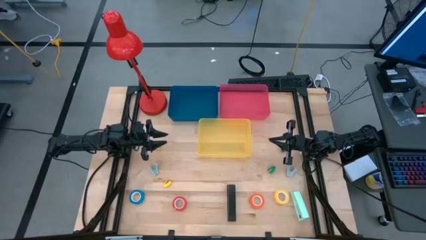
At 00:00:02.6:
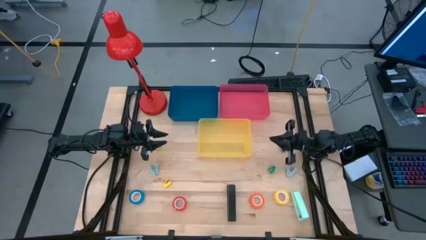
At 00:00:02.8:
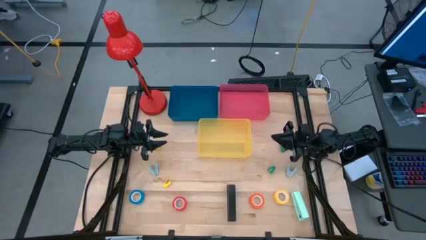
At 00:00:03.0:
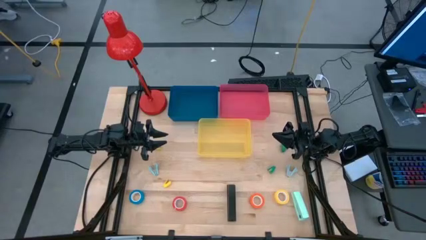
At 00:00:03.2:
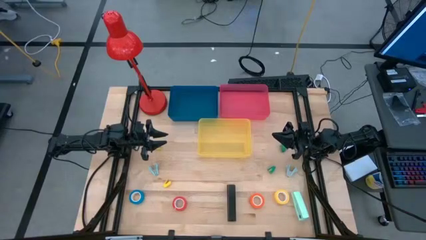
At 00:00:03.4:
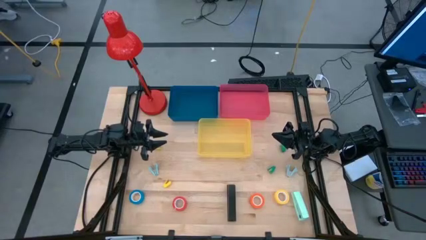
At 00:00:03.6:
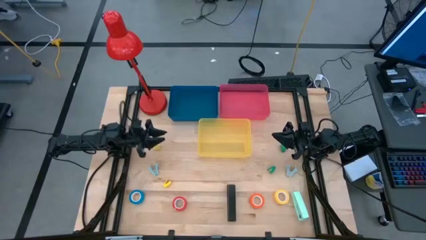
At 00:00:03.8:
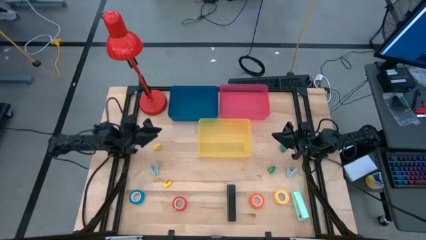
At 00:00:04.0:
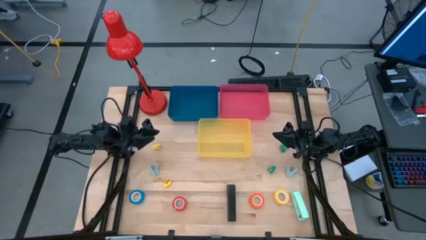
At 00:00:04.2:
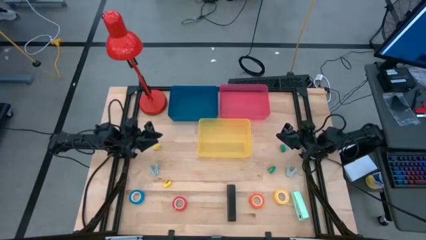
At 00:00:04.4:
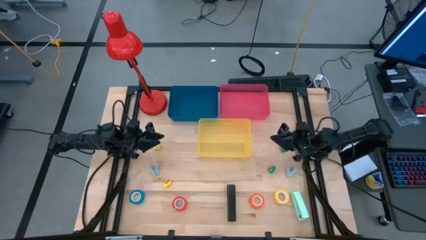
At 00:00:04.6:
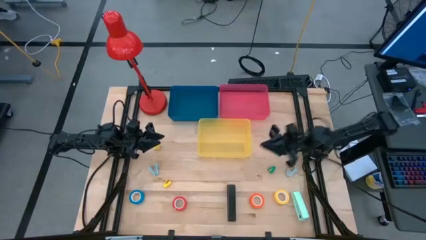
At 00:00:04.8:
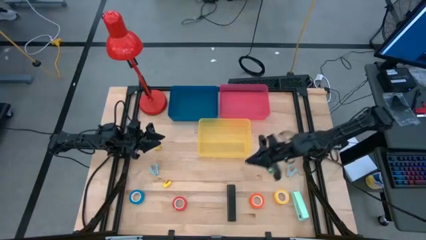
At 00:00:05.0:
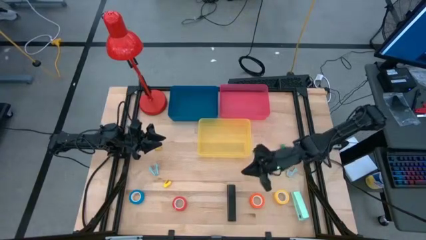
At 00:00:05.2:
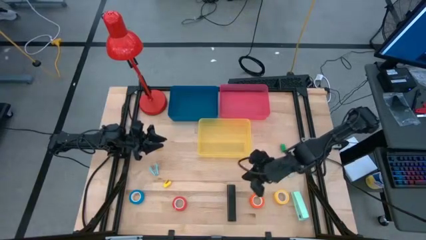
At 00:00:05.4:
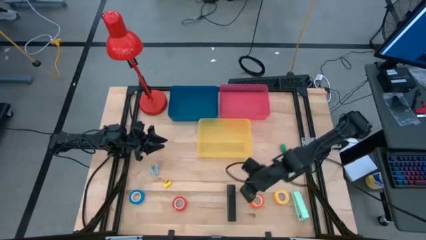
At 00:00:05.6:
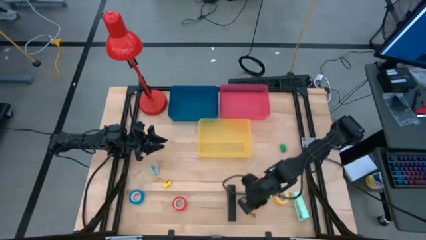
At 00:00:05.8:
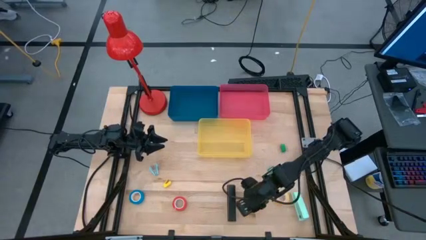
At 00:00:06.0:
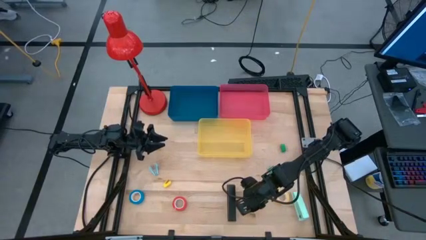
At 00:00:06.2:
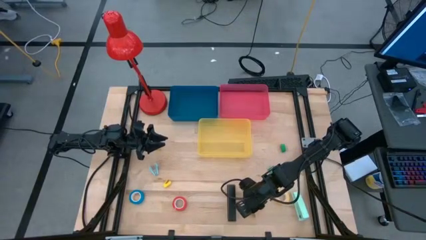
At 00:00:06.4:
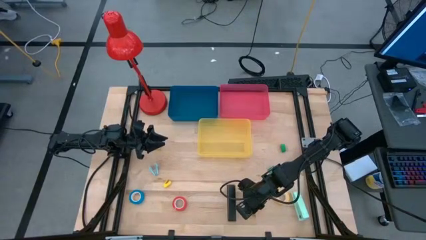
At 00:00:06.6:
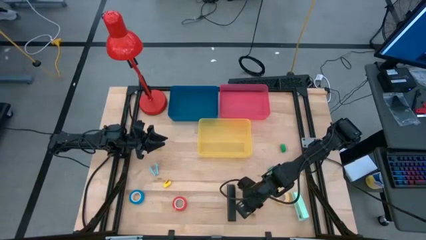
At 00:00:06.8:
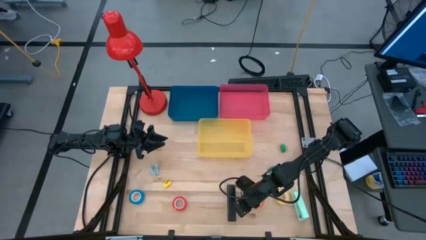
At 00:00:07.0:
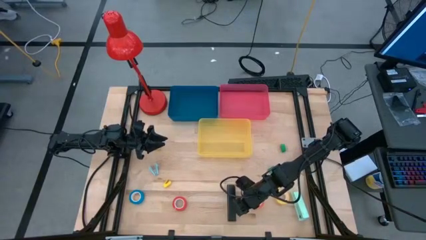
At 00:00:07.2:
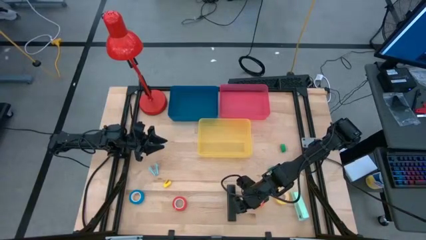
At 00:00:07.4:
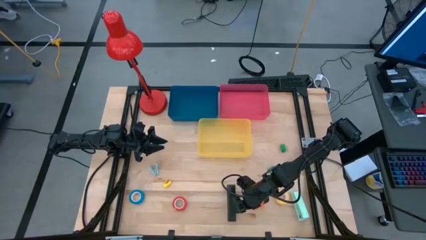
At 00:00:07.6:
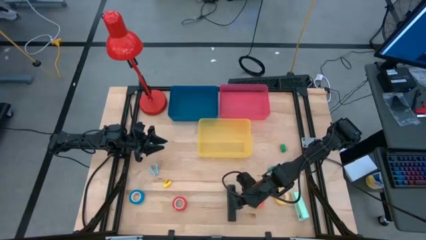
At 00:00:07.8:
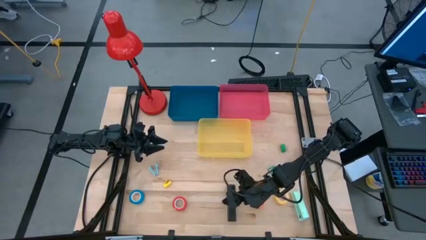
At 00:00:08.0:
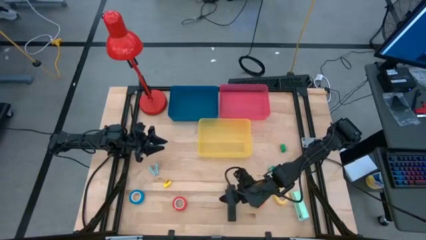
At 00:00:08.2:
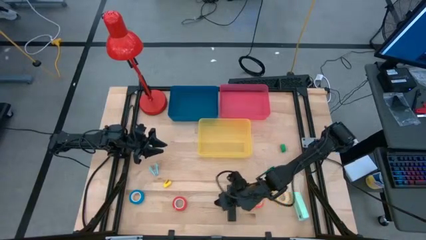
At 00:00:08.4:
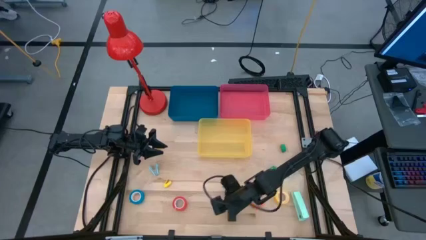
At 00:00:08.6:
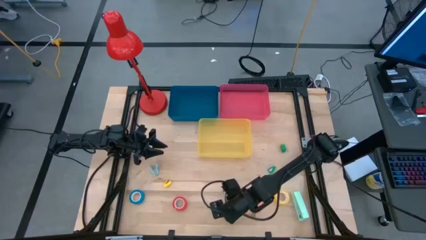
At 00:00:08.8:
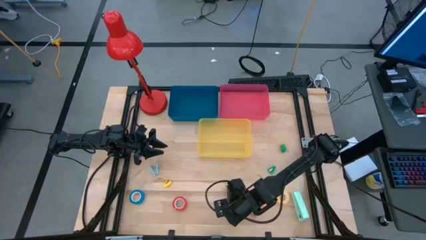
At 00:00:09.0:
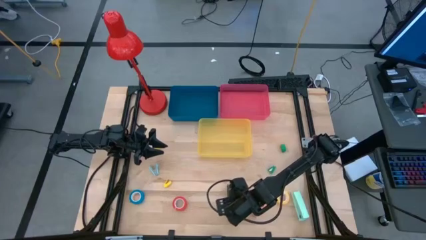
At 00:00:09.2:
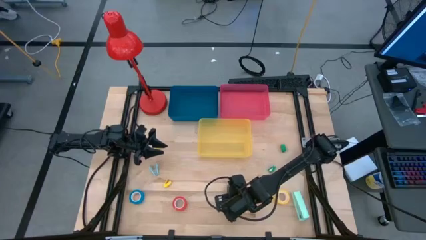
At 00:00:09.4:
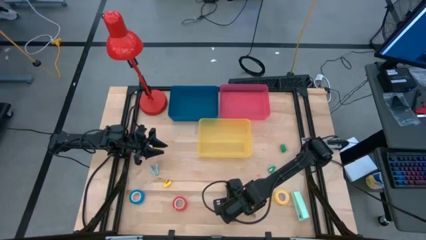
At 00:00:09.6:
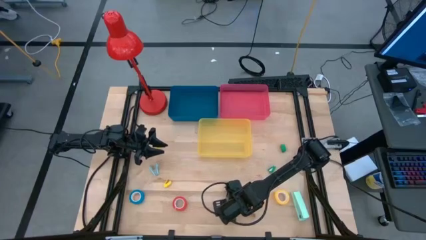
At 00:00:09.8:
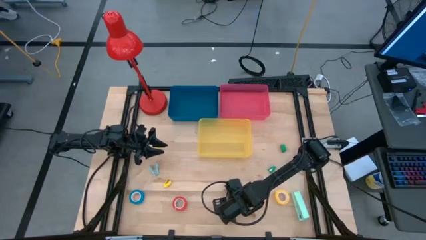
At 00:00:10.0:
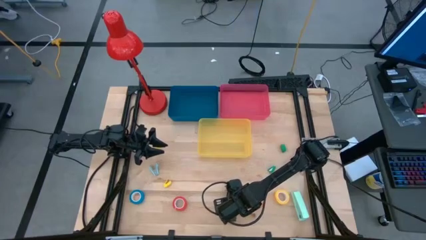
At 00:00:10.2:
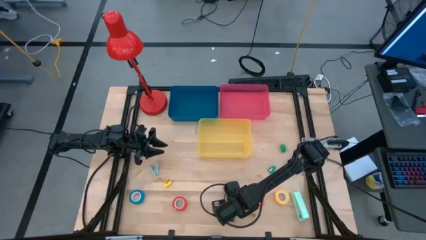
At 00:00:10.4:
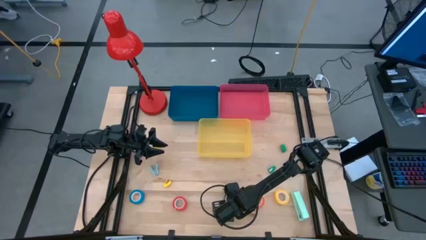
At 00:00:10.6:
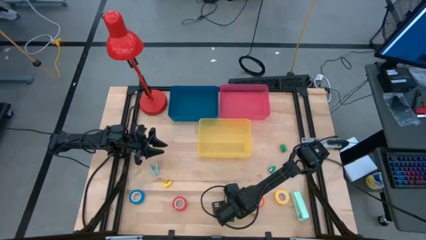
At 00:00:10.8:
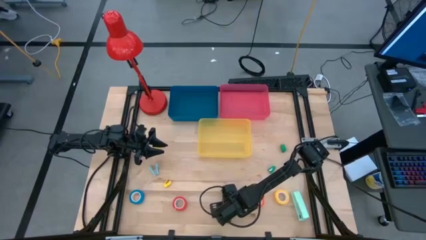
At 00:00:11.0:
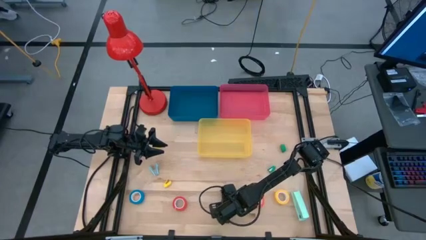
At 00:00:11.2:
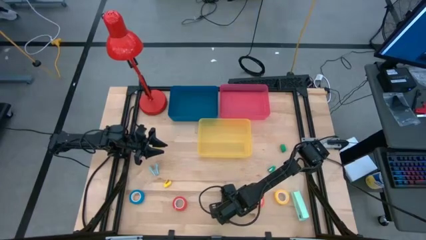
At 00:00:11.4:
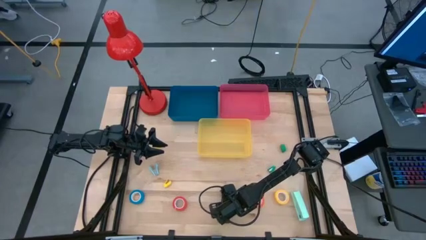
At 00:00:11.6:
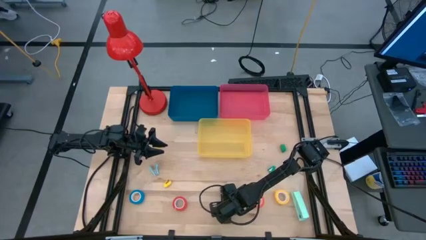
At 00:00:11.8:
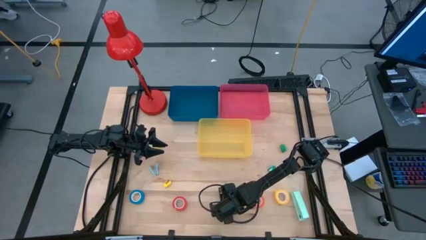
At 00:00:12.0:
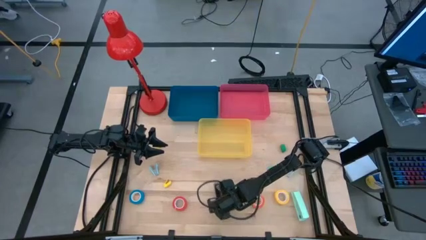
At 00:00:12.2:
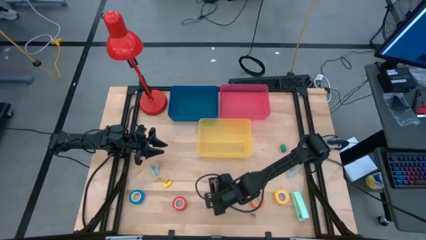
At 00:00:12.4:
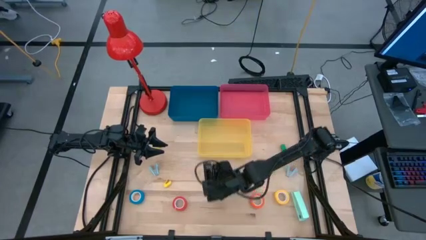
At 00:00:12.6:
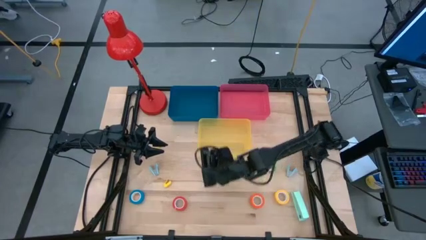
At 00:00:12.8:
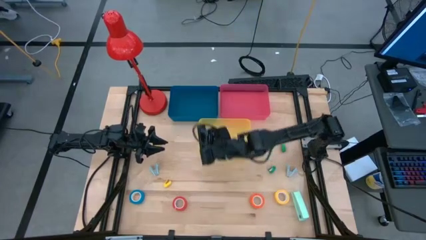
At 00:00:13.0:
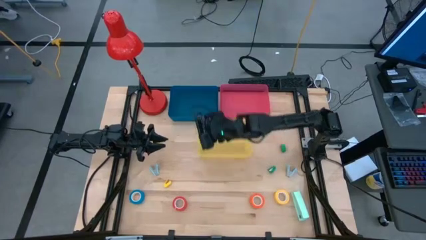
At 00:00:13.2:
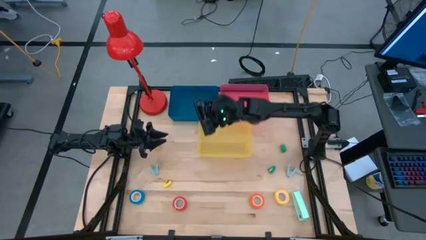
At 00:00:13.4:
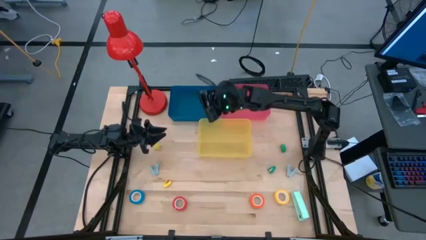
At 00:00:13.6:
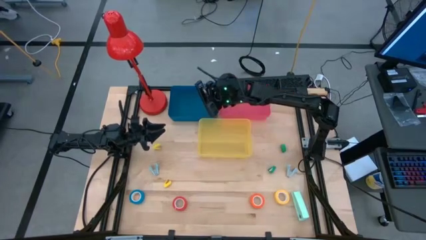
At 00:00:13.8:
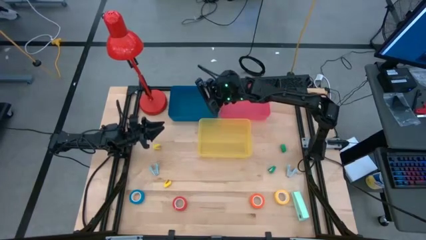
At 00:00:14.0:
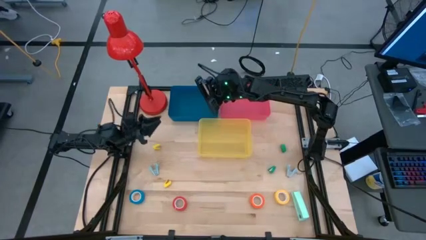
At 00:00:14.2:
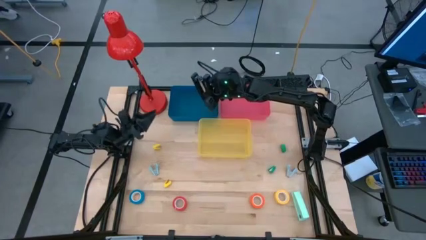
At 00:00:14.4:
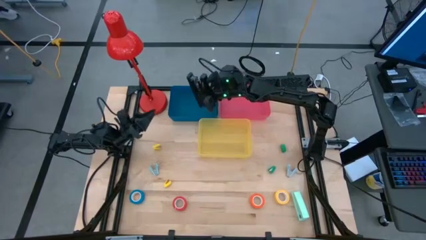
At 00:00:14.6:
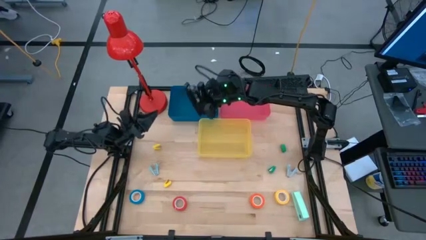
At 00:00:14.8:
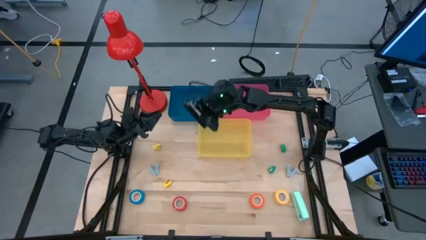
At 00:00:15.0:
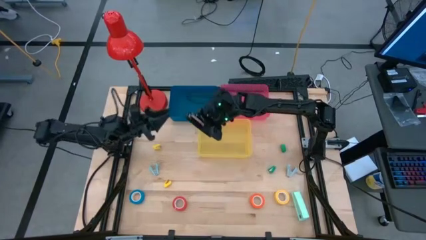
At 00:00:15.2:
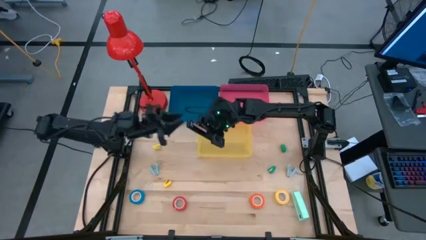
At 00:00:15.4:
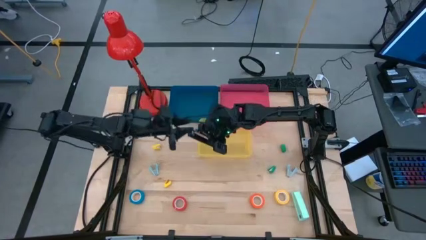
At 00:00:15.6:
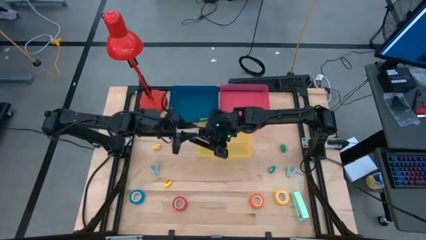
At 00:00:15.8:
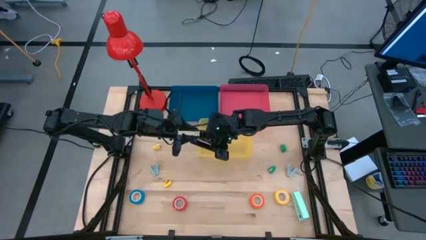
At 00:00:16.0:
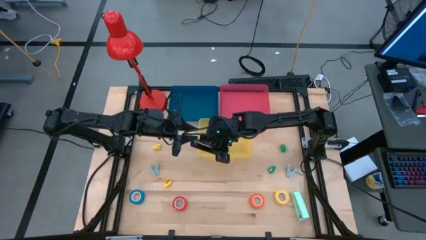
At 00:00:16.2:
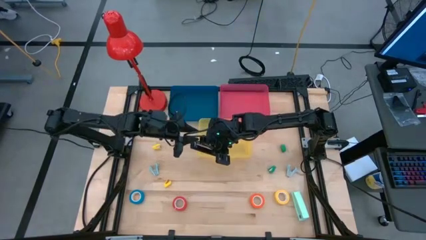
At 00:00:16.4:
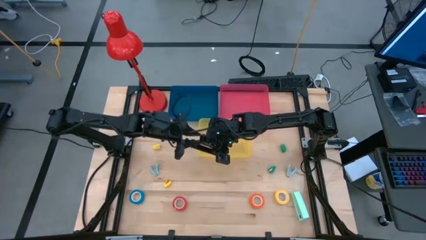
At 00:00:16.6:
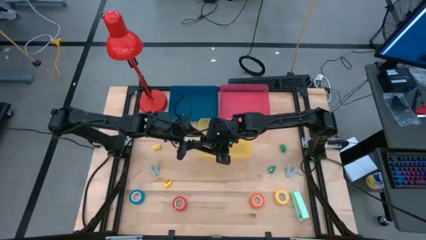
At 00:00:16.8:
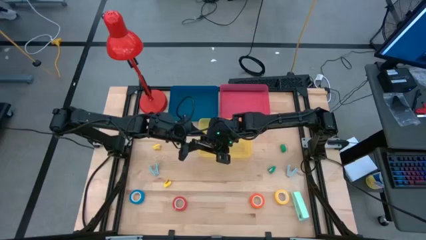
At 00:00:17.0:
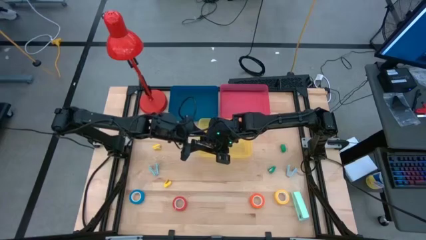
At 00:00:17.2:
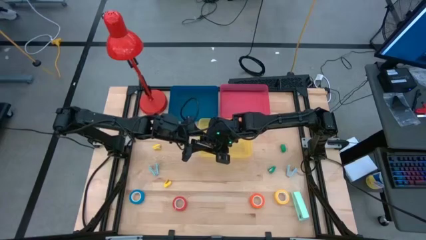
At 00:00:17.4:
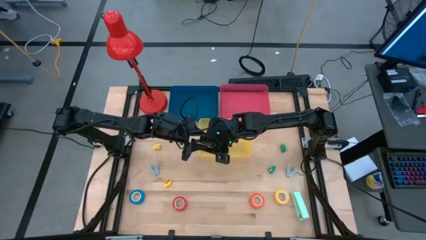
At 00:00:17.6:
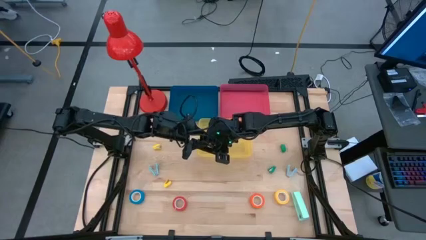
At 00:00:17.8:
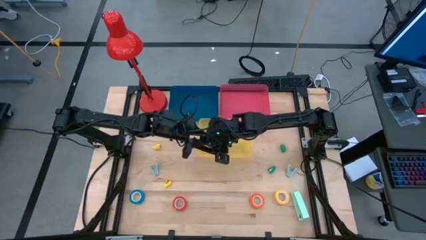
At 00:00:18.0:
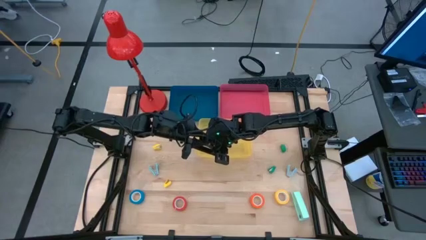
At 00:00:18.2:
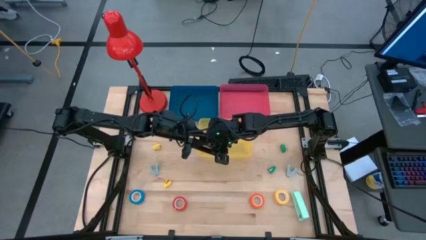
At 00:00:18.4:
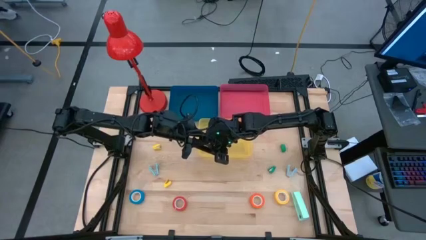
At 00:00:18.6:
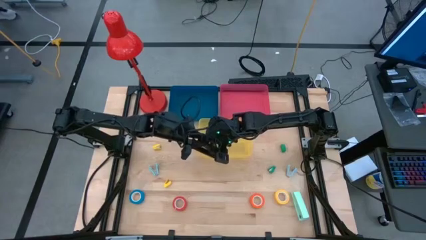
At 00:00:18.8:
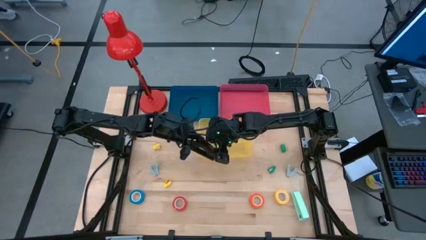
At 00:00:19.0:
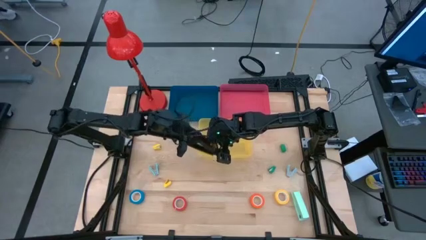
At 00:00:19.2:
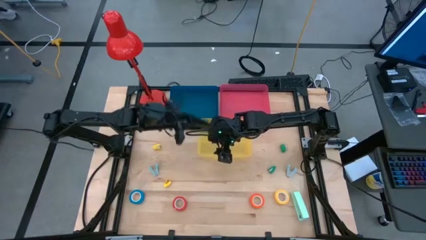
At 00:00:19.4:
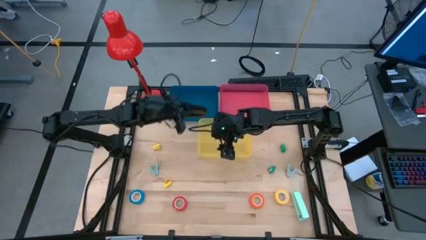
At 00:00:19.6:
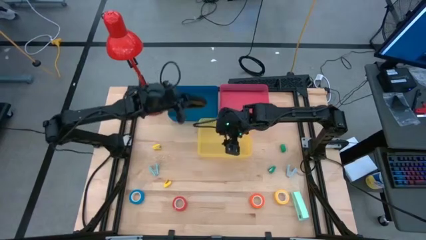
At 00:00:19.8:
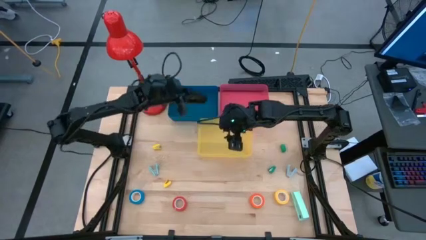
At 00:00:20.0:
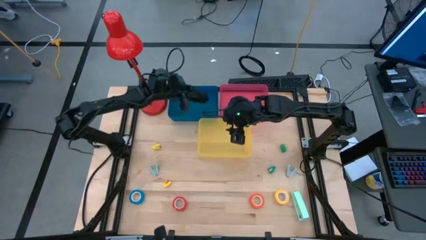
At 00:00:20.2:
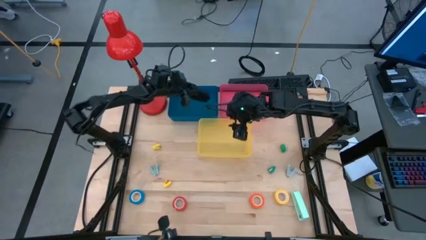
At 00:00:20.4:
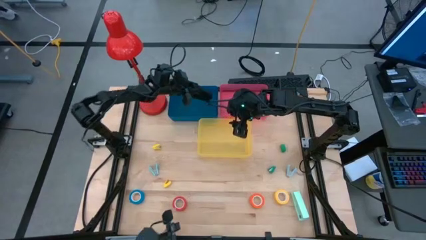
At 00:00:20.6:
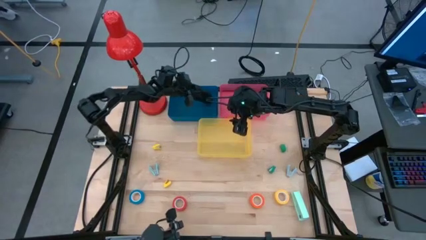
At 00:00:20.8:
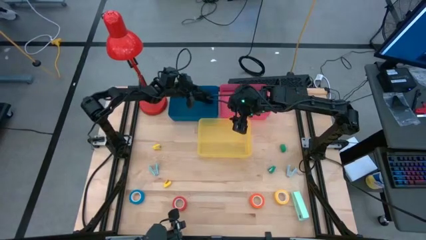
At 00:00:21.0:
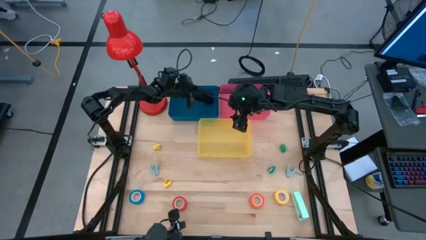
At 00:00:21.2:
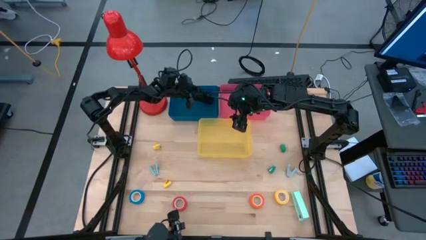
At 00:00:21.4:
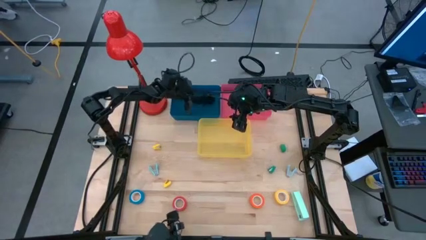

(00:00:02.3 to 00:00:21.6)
Task: Pick and place Stapler, Stapler remover, tape
Put the black stapler into the blue bin
